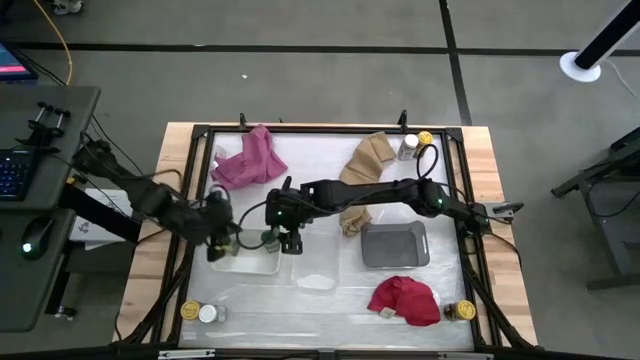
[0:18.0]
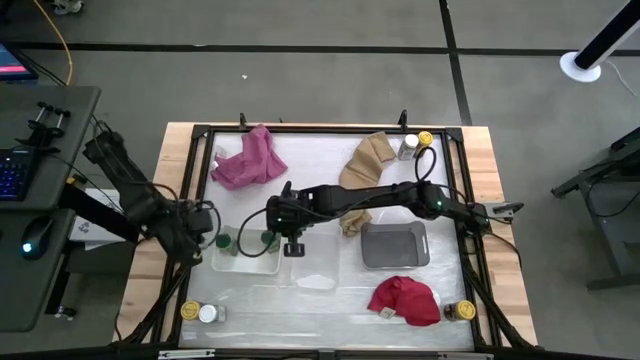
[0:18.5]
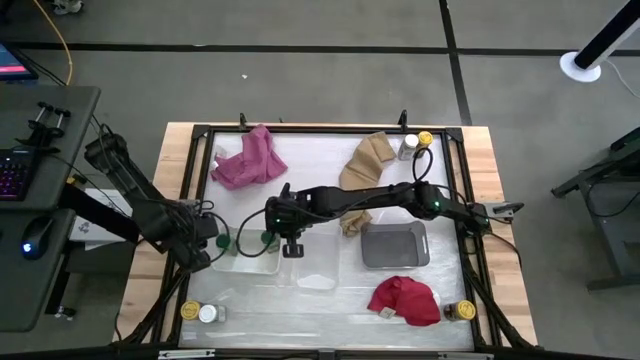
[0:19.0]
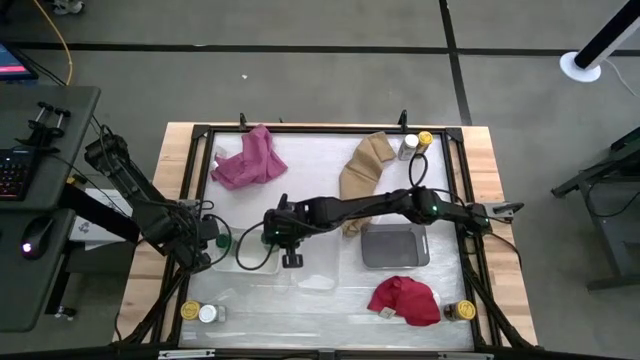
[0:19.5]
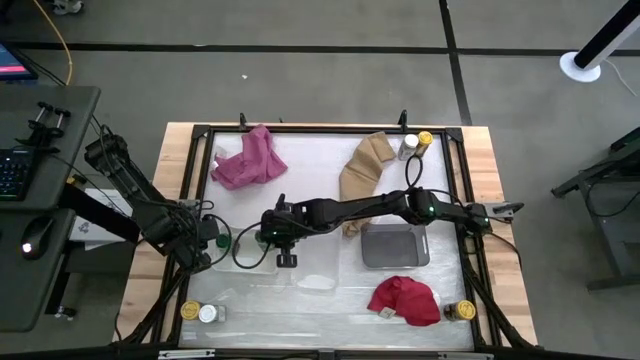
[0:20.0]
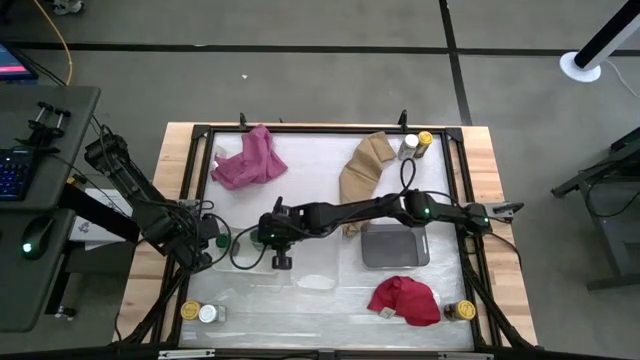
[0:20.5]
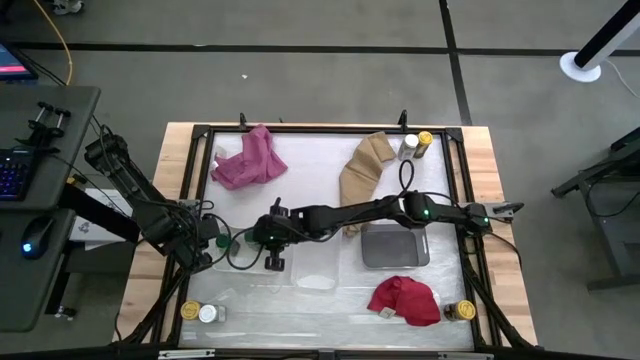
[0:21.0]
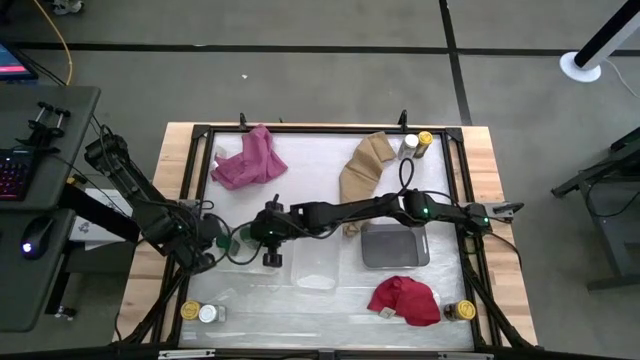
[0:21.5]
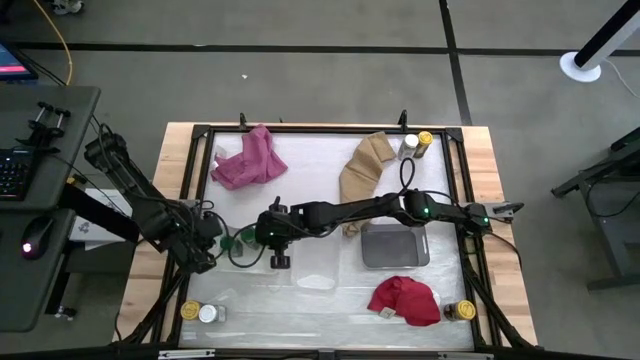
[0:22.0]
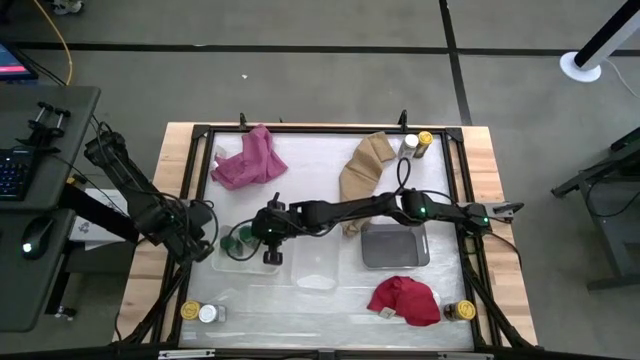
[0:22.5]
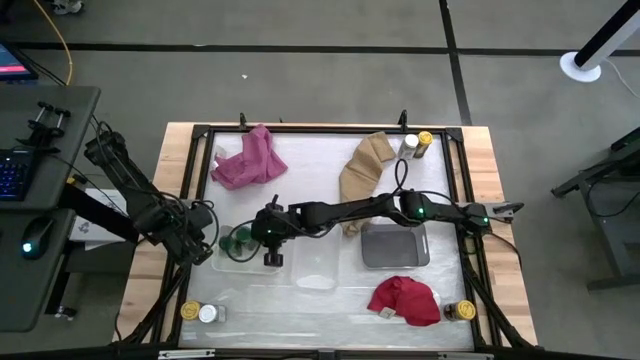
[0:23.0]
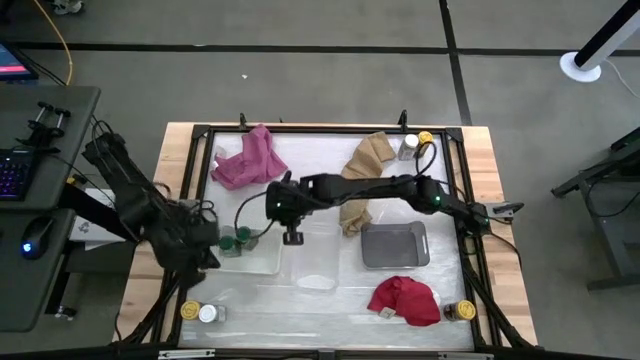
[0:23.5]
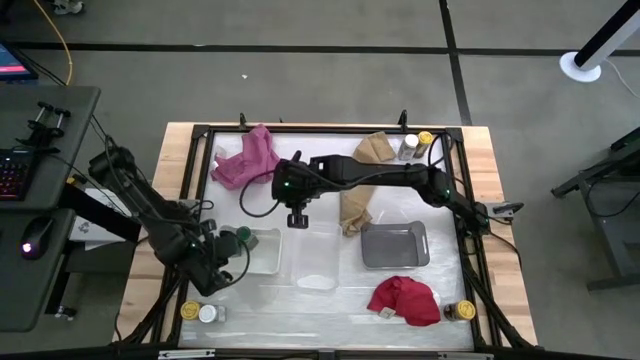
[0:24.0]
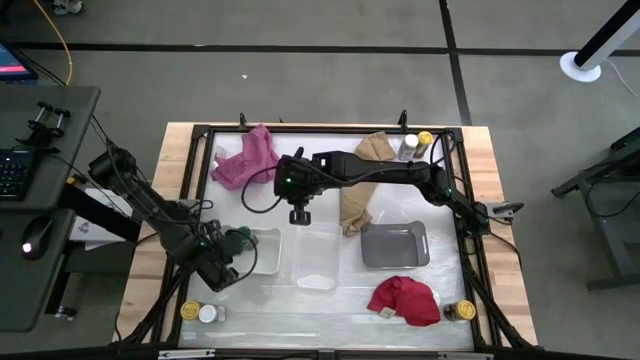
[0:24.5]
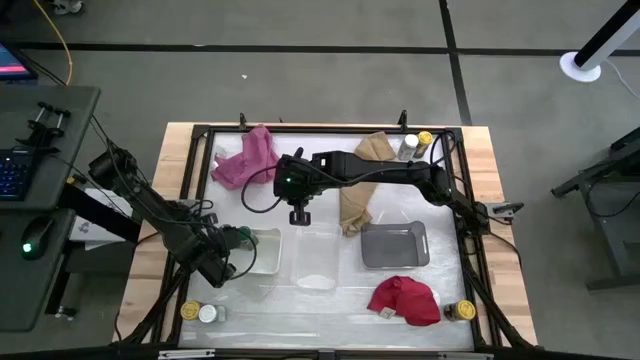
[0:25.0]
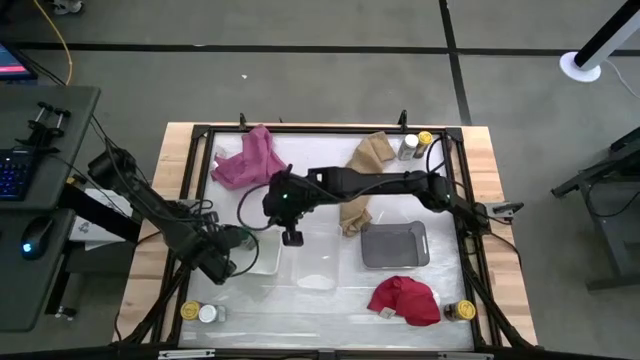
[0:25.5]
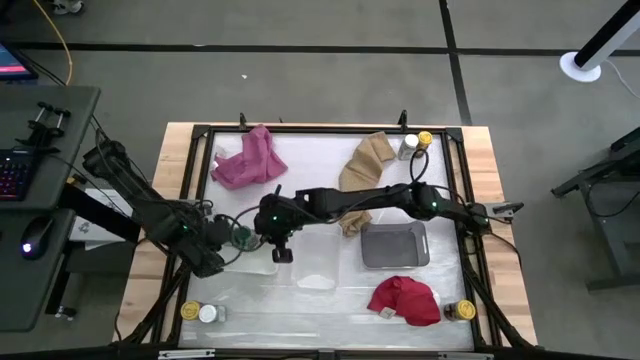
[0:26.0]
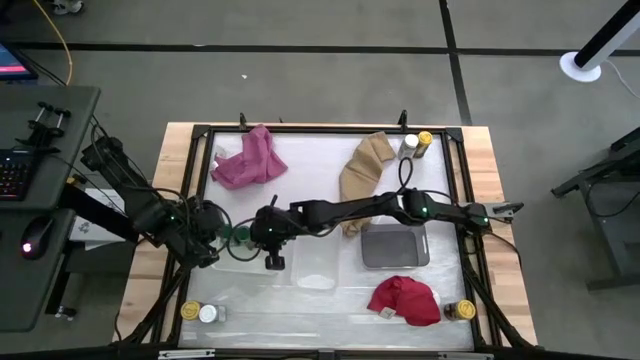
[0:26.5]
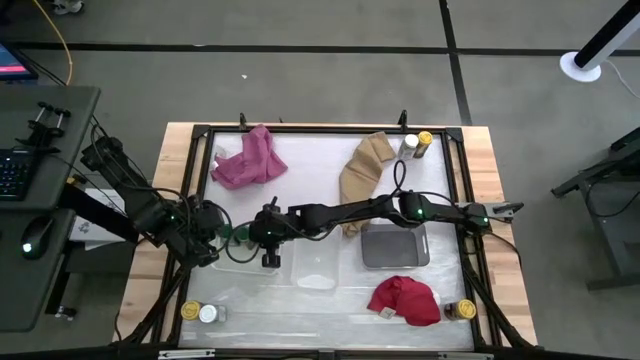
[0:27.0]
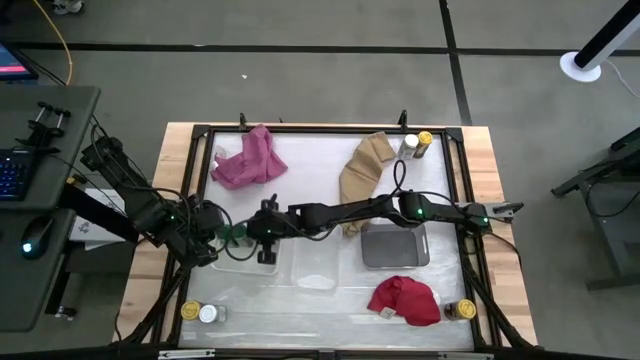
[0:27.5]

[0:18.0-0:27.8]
Task: Sort spices by type
Adjust the green seasoning bottles in the white bin

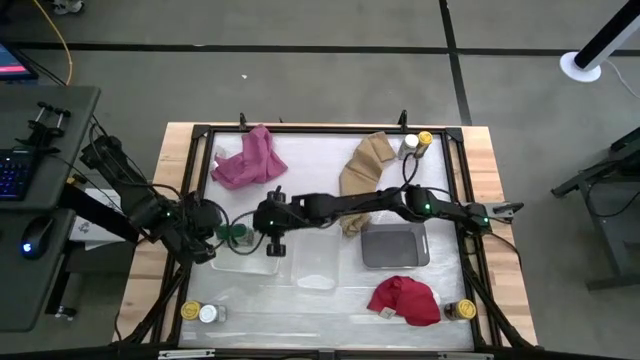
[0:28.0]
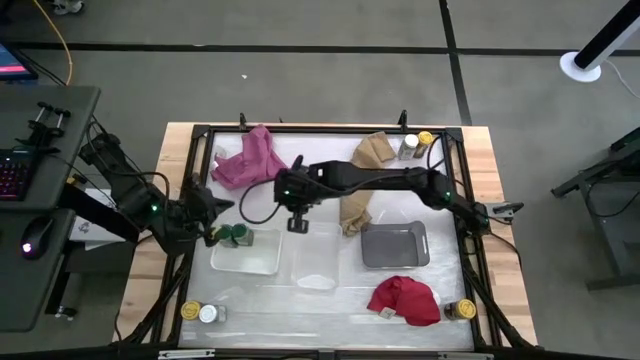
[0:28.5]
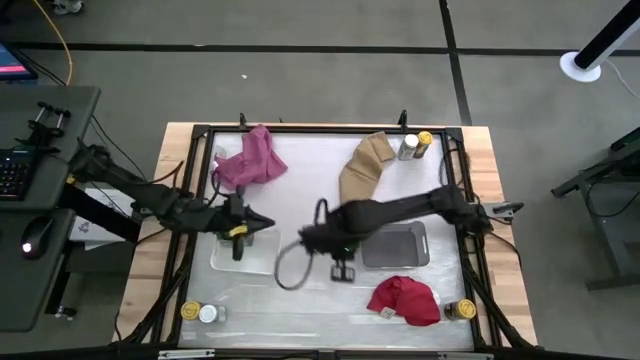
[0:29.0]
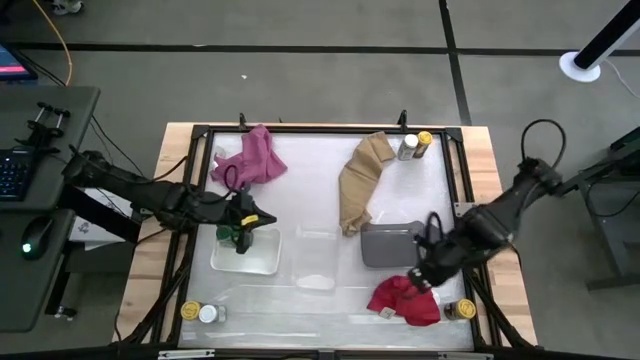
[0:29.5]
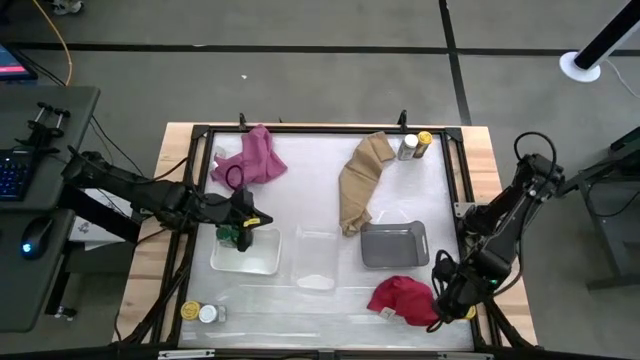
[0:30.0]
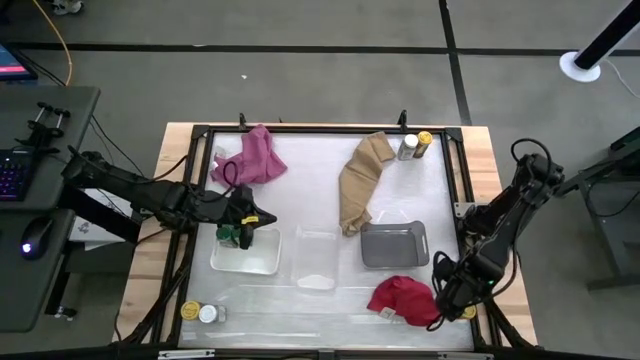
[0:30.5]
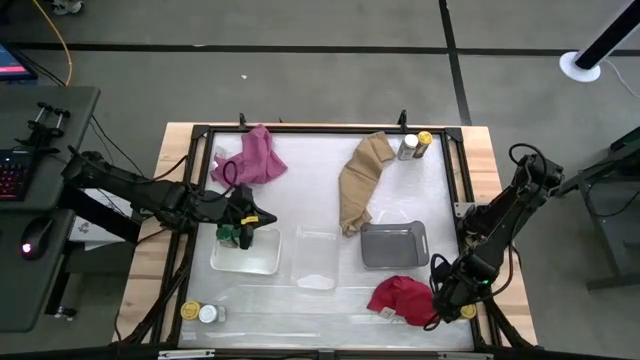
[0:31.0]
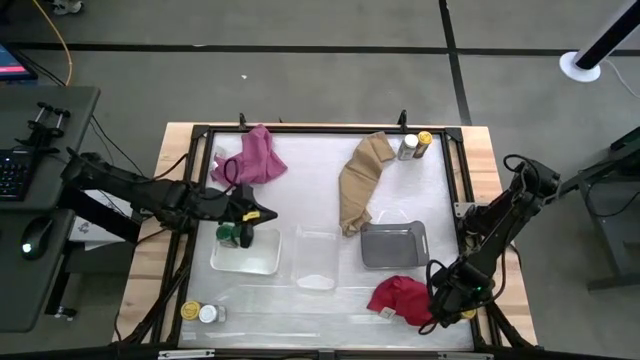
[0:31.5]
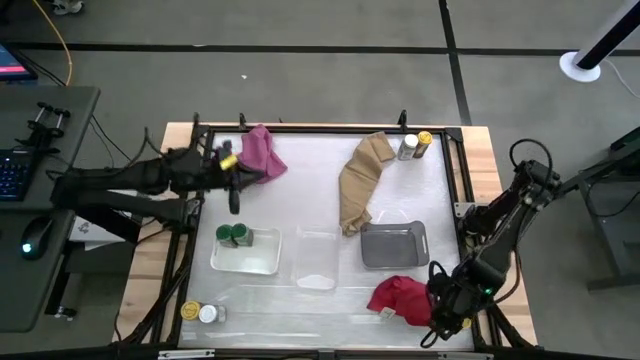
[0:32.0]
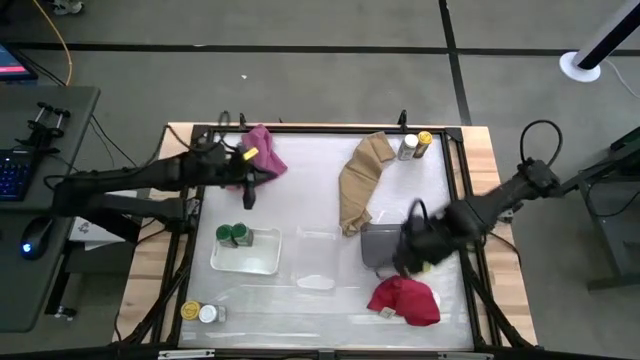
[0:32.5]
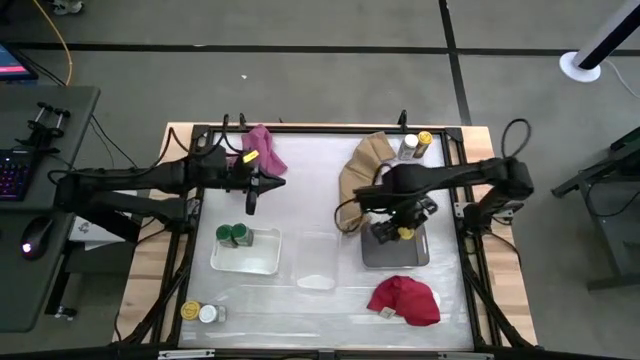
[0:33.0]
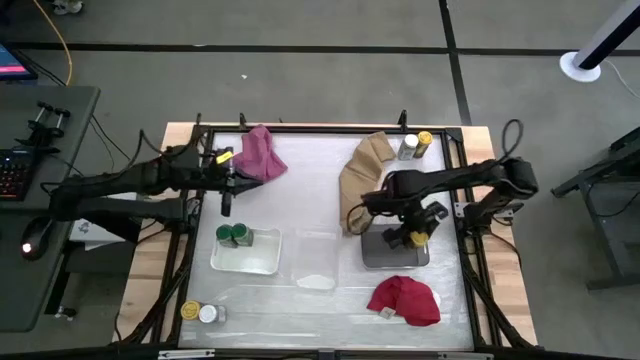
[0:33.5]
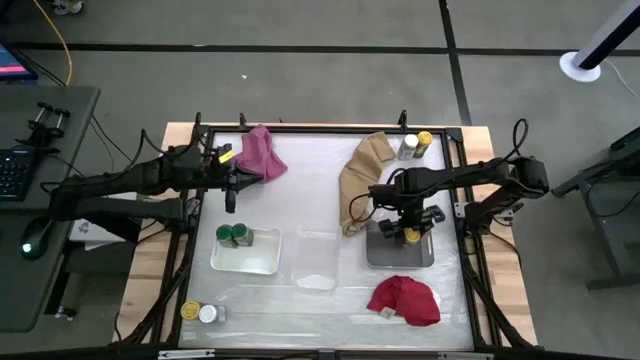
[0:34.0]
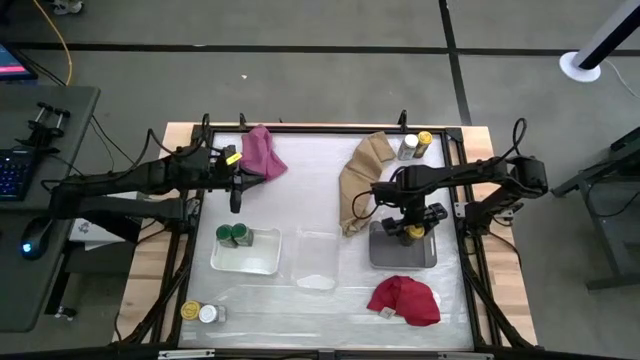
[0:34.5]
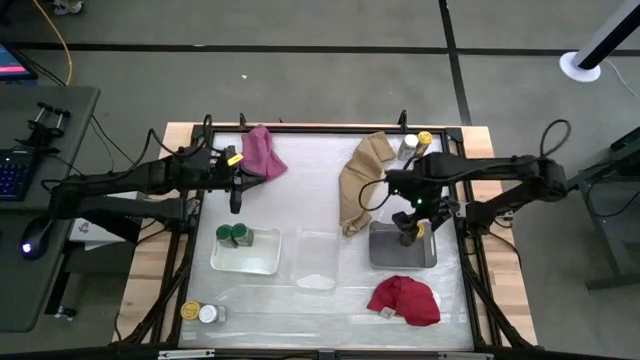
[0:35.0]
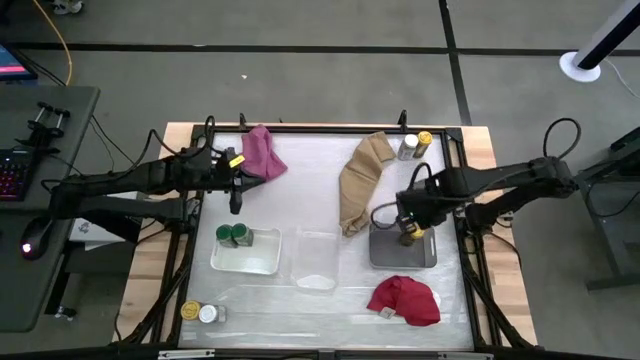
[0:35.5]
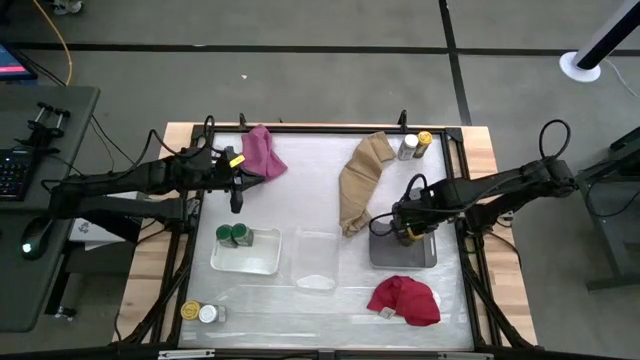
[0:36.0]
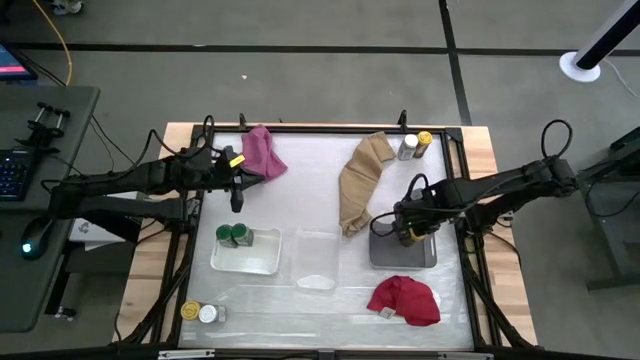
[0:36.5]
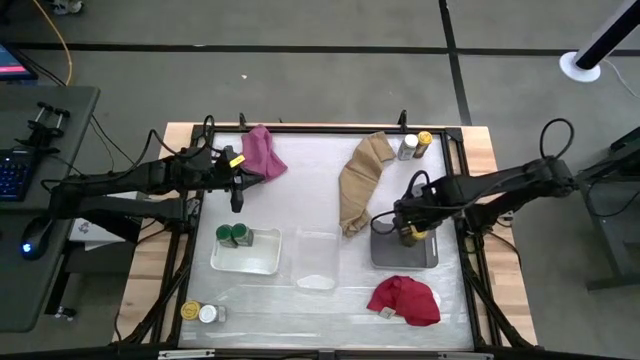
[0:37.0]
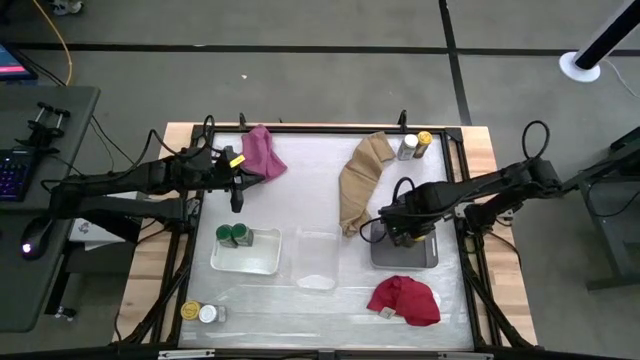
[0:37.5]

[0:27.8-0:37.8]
Put the bottom right yellow seasoning bottle into the black bin

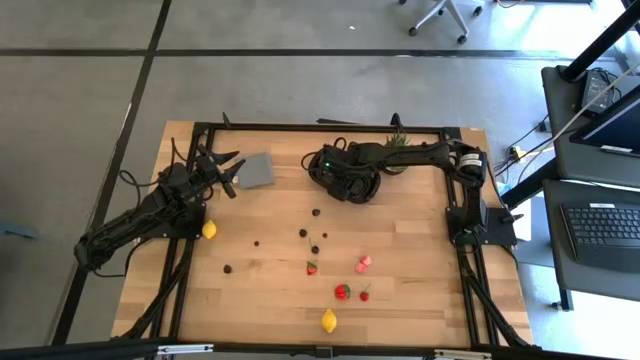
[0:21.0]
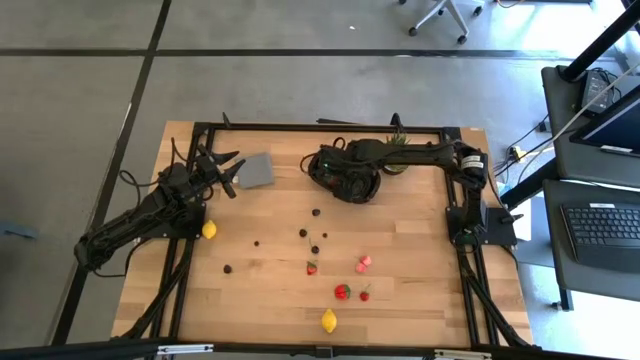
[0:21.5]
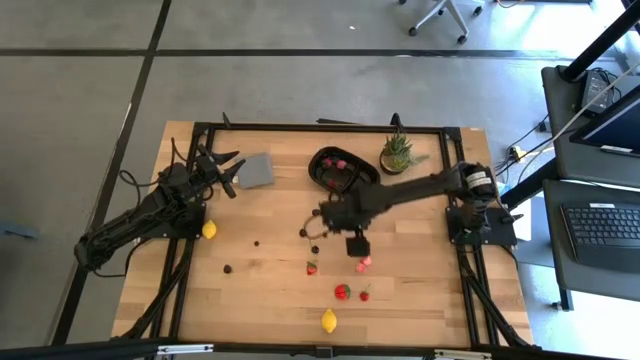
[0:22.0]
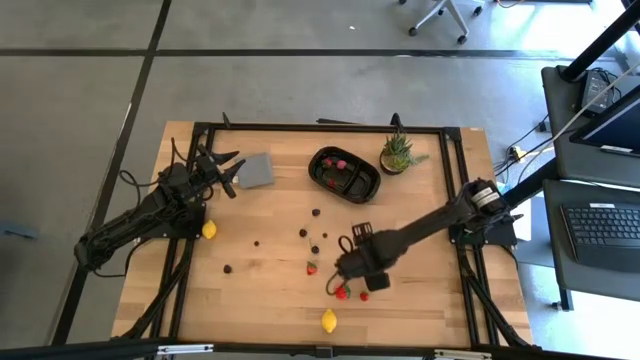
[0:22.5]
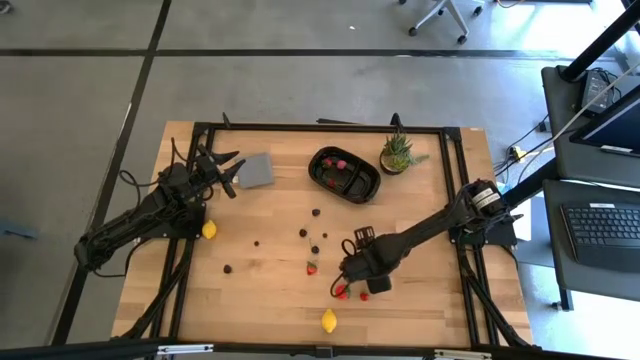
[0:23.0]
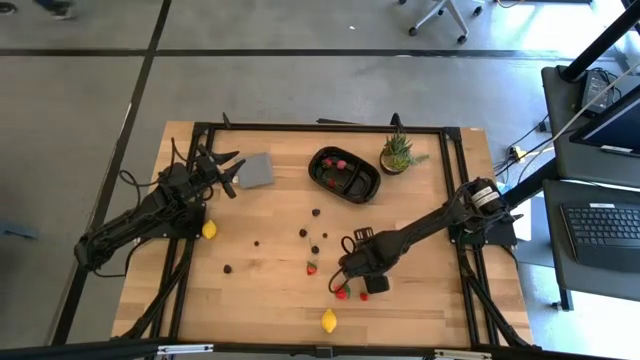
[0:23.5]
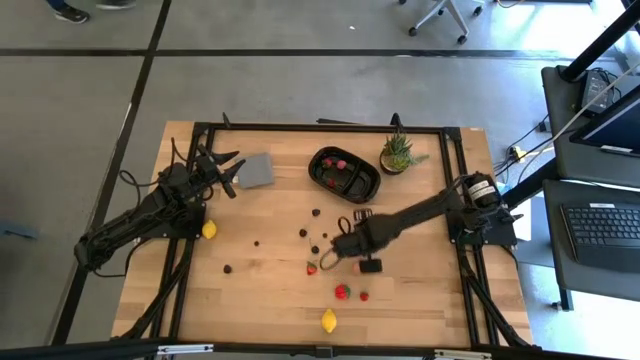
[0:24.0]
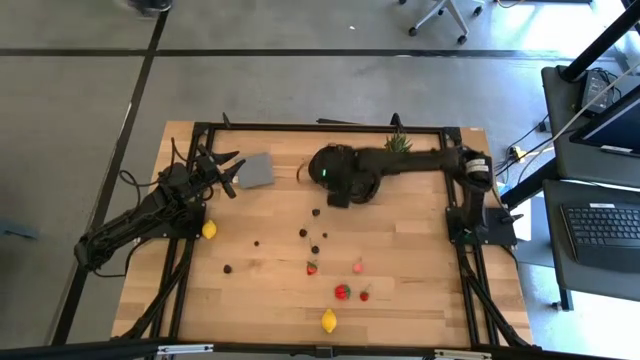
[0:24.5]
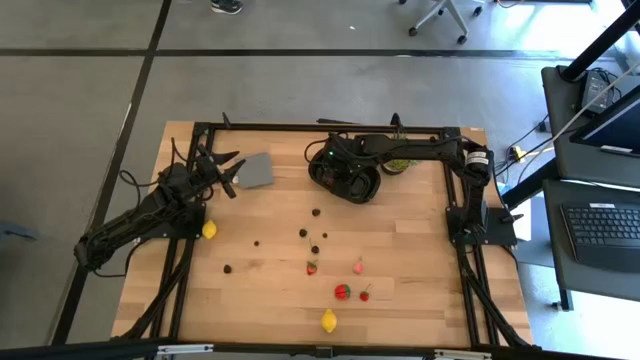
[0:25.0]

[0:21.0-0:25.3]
Task: Pick and placing Produce into tupperware
Put the top apricot into the black bin
